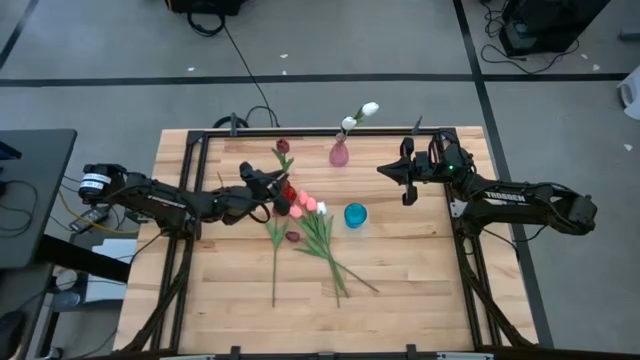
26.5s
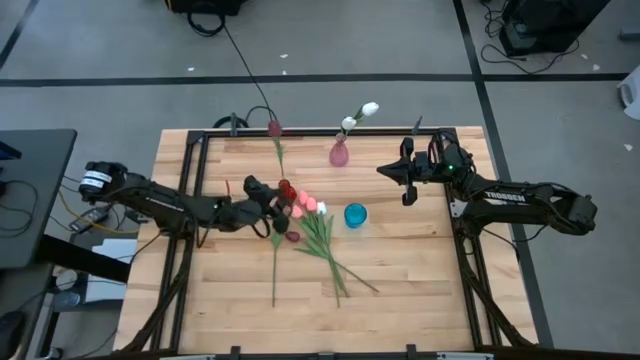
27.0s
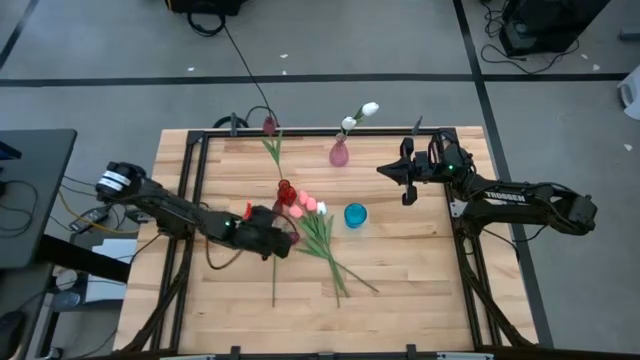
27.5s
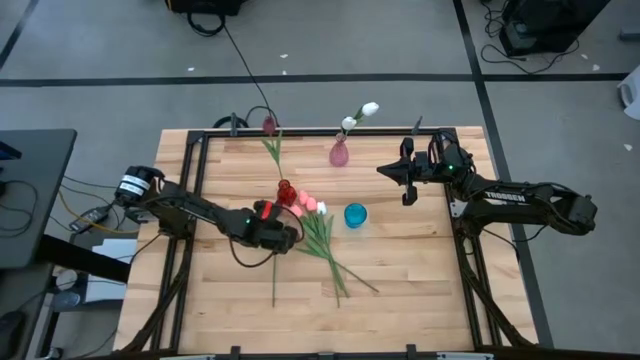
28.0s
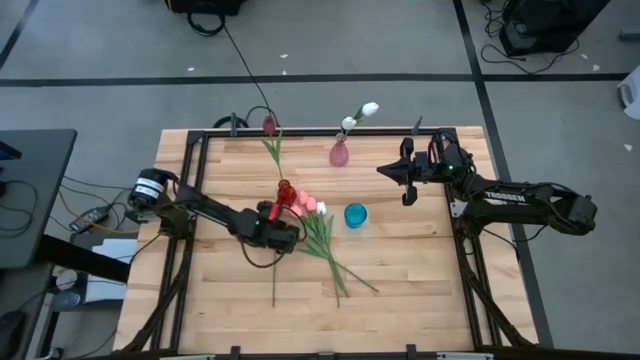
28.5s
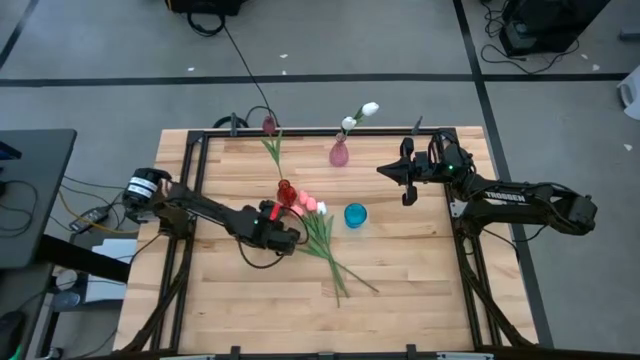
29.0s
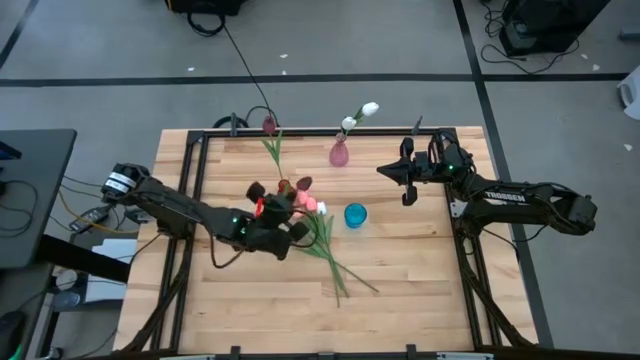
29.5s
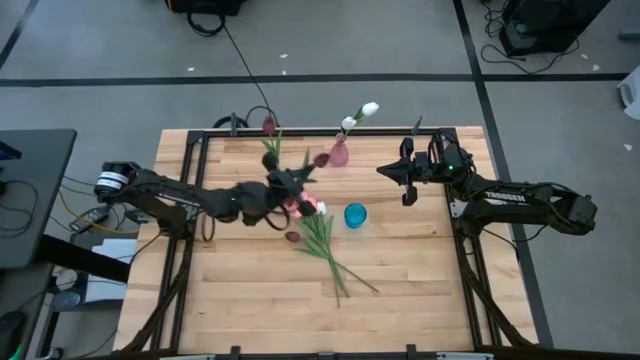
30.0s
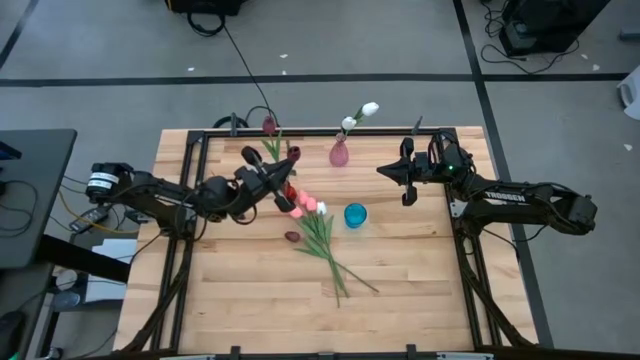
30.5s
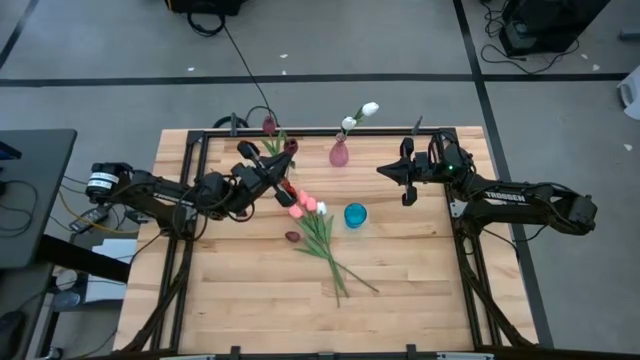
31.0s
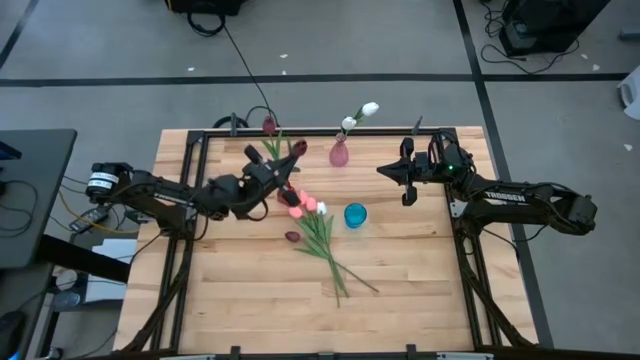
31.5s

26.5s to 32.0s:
Task: Sort flowers into vase by color
Put the red tulip into the red vase

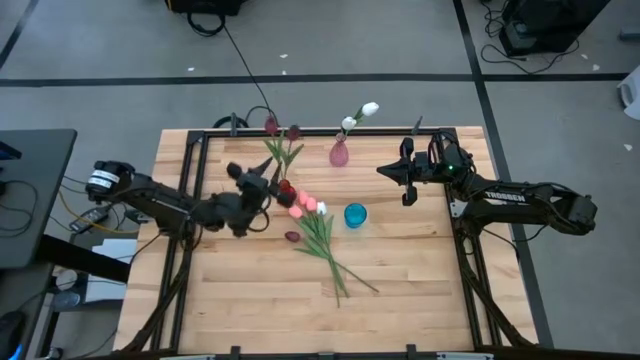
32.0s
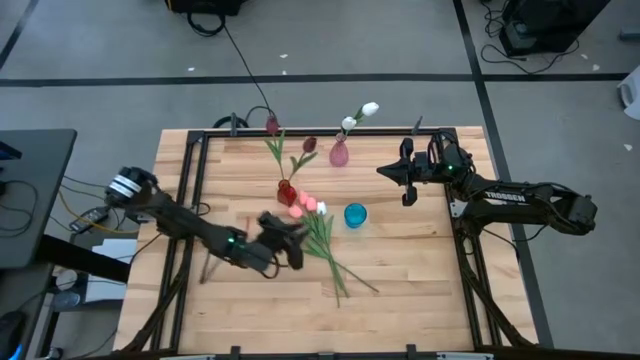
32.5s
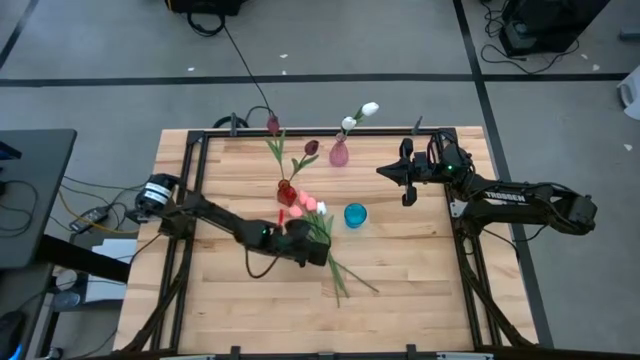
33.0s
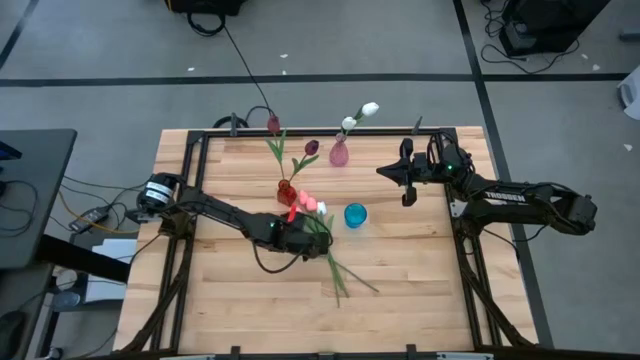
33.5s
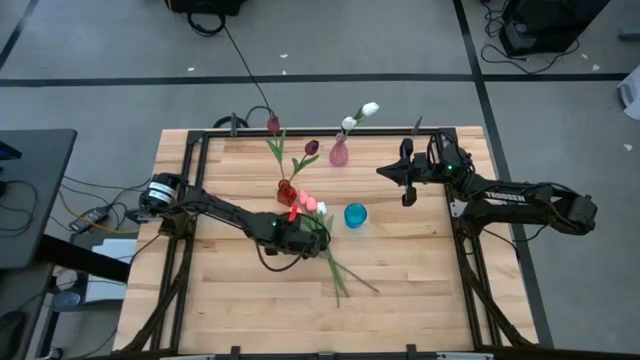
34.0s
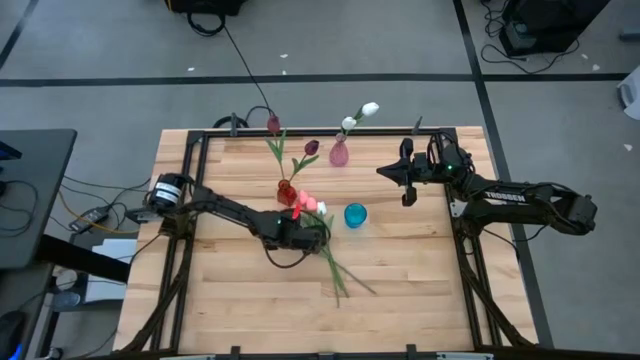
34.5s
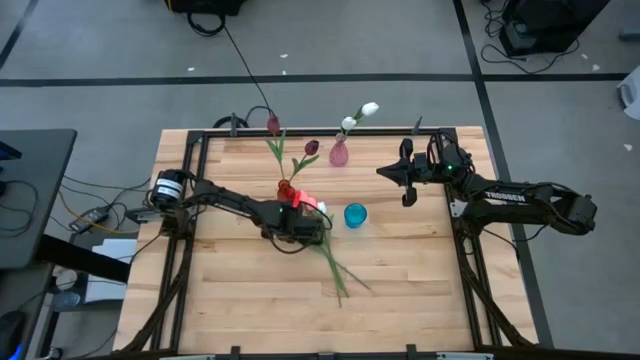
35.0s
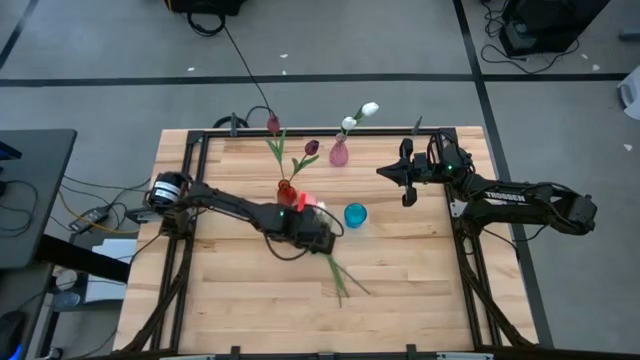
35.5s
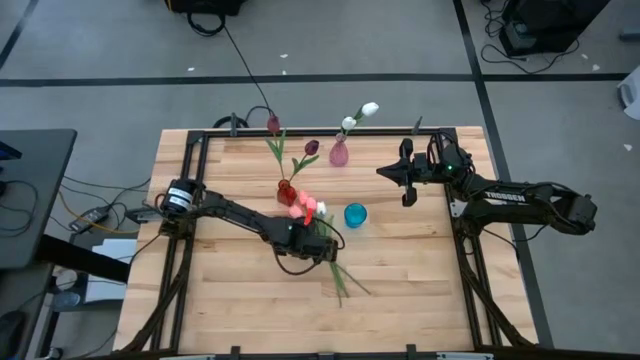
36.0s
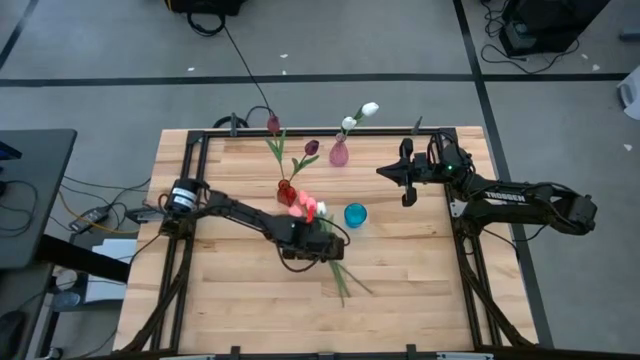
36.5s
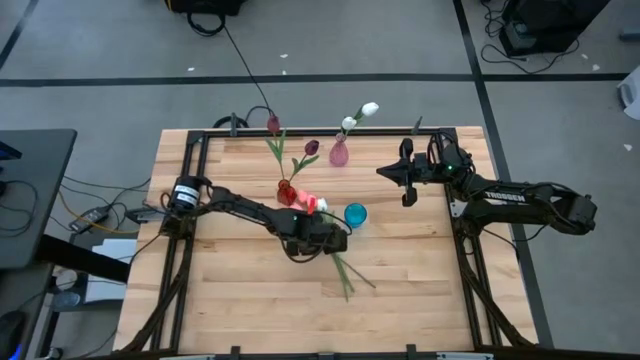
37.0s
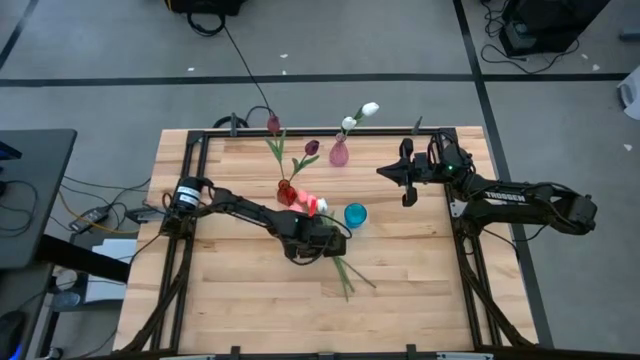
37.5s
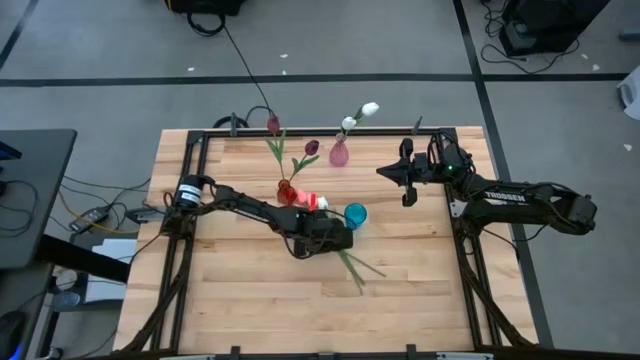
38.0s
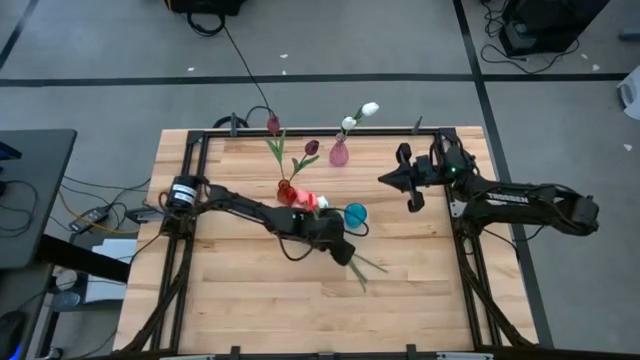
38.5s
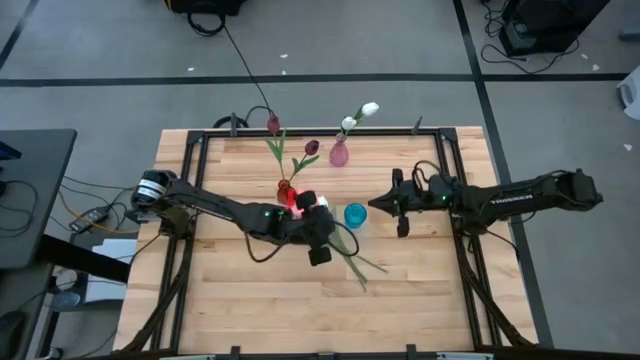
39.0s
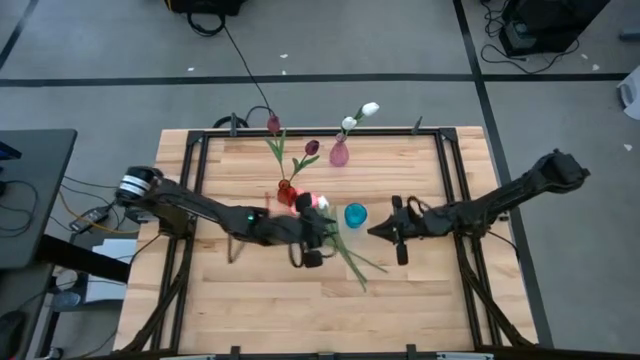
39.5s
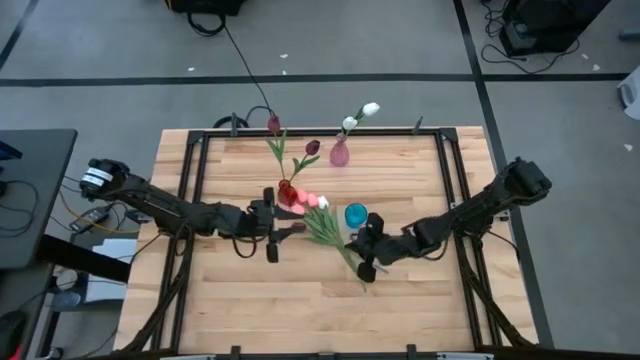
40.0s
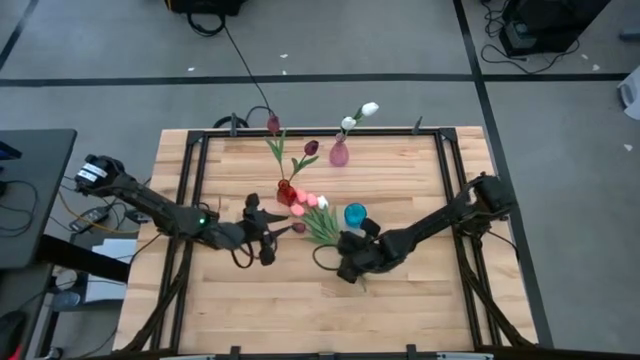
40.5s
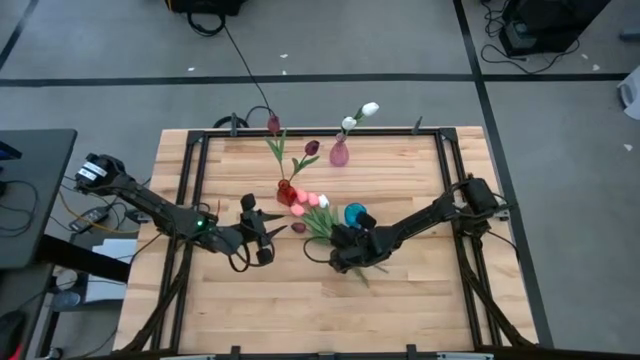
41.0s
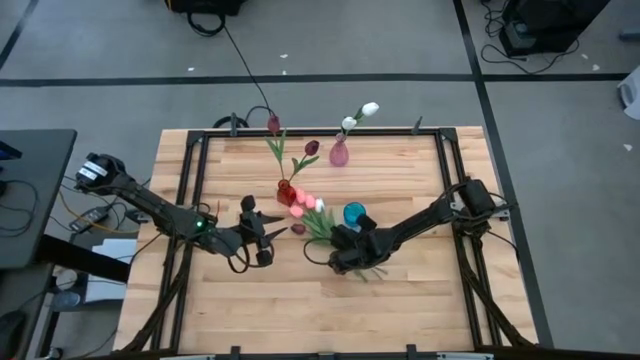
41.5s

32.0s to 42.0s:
Put the white tulip into the pink vase

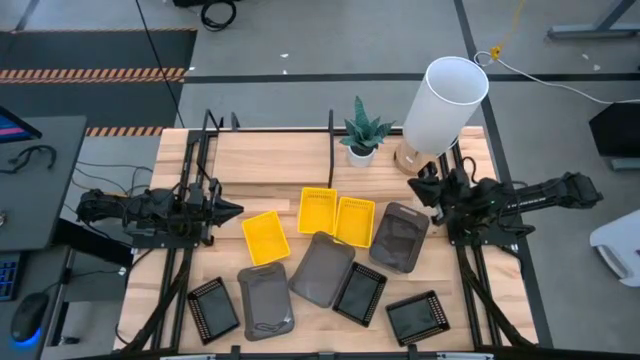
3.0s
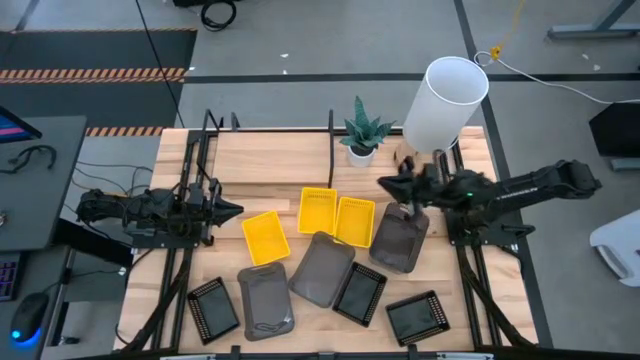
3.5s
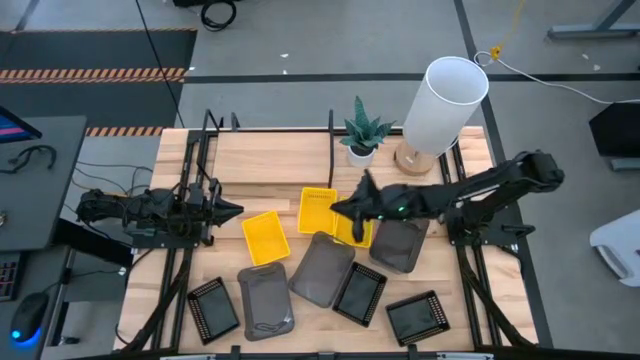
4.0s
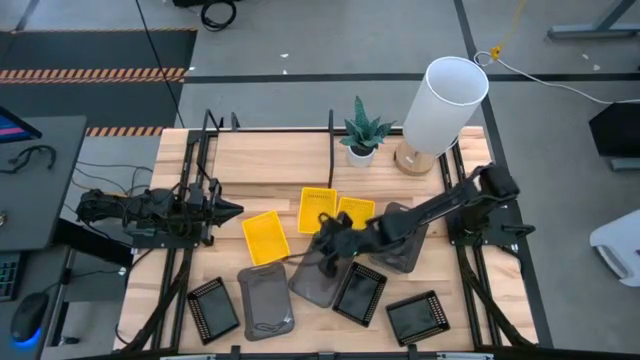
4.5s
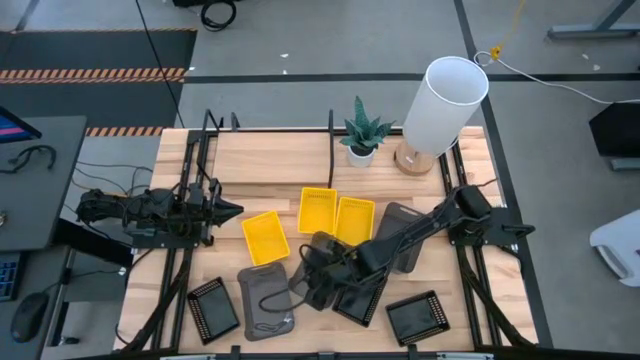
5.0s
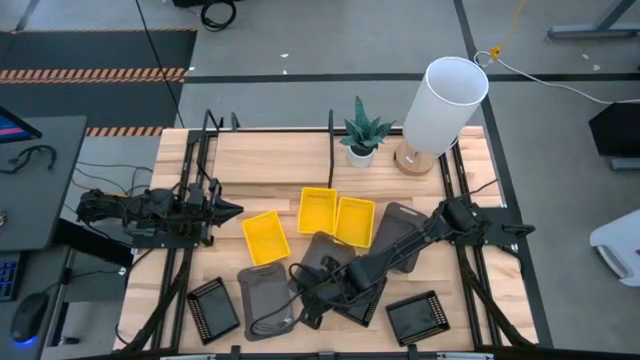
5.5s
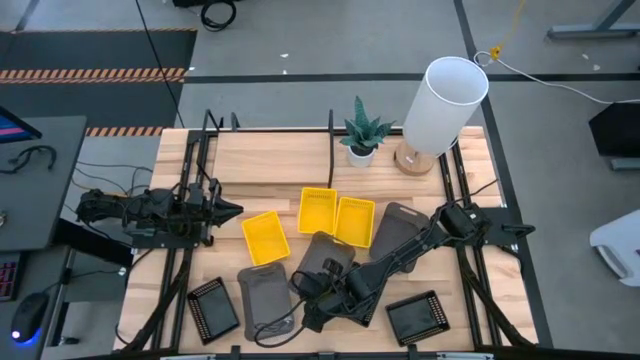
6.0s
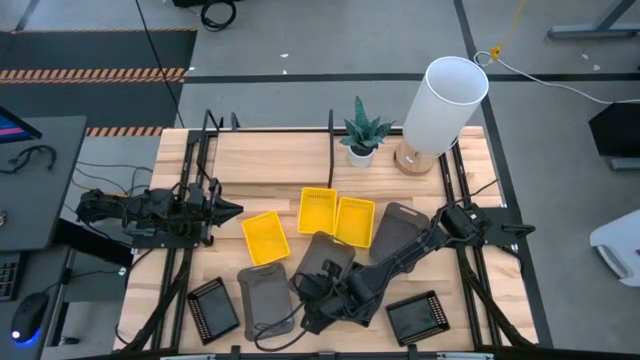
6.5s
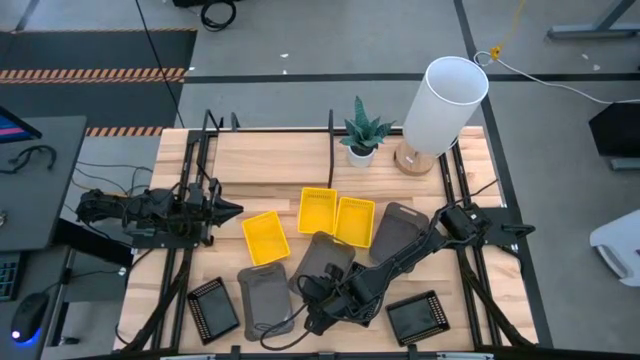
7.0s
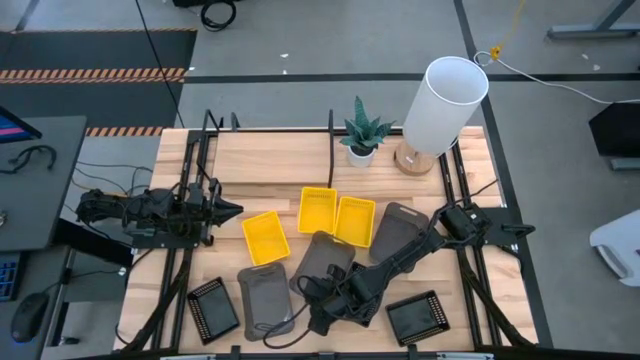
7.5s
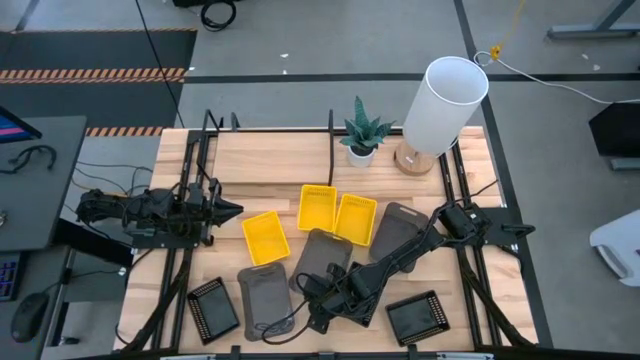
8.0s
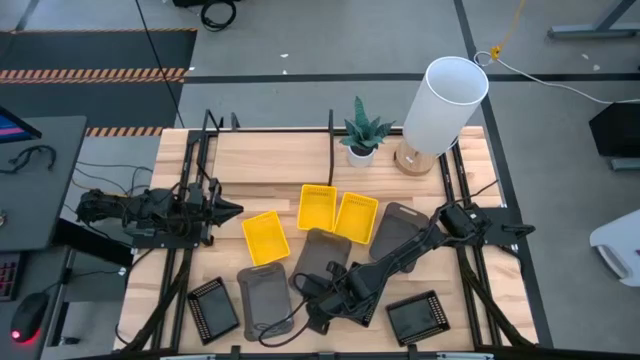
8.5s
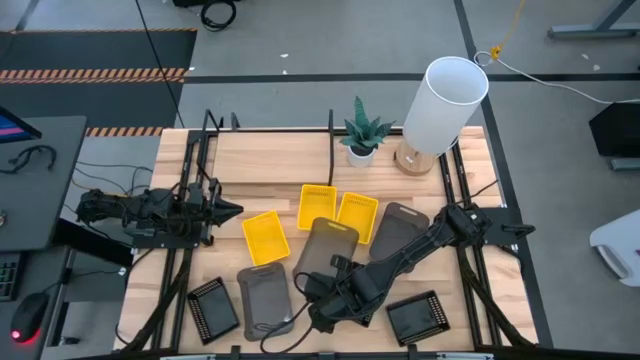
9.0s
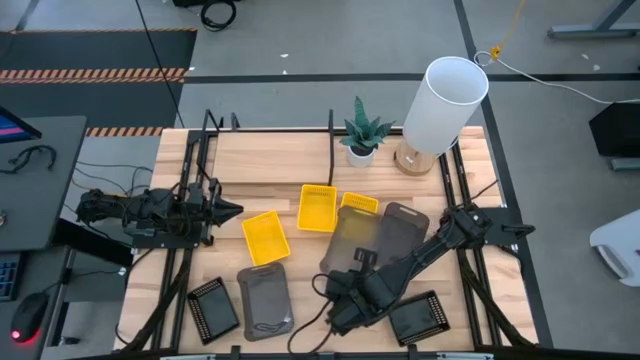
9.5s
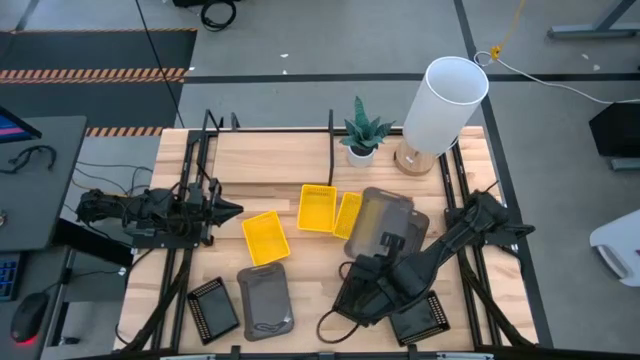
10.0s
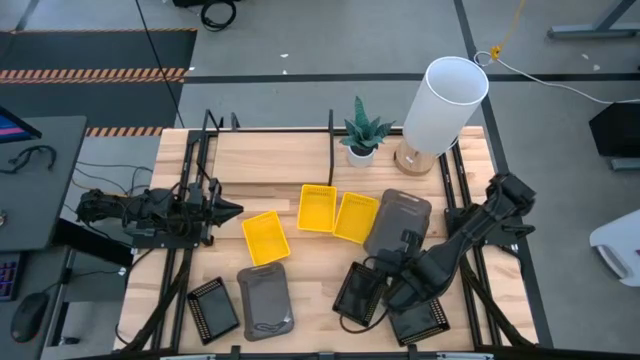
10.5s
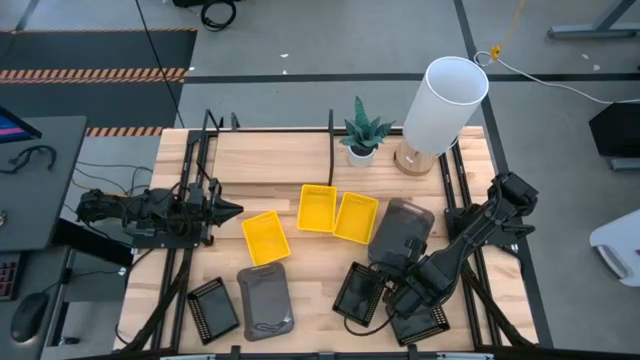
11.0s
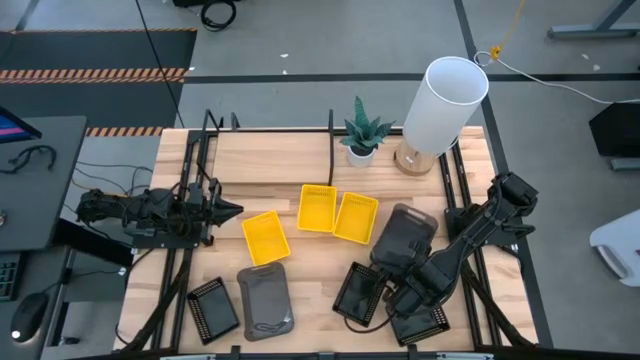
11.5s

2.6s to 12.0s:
Task: Stack baskets on shelf by color
Stack the middle transparent black bin into the right transparent black bin
